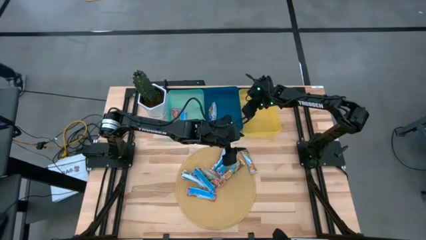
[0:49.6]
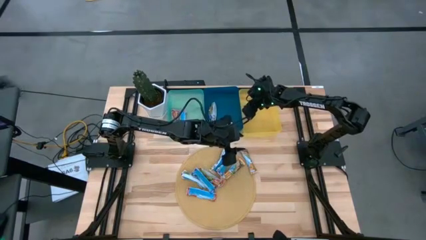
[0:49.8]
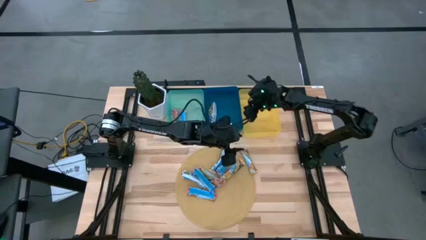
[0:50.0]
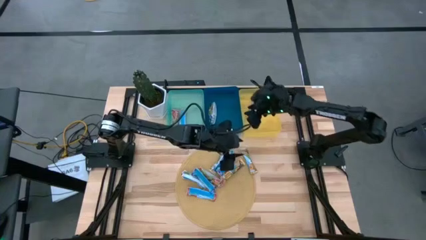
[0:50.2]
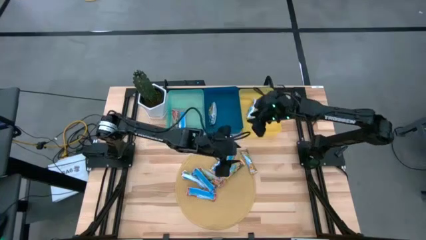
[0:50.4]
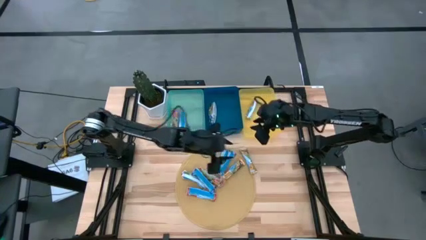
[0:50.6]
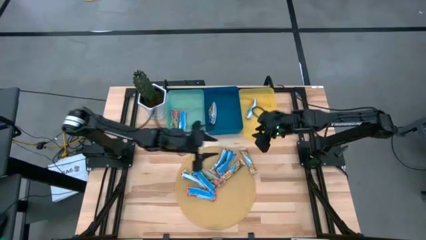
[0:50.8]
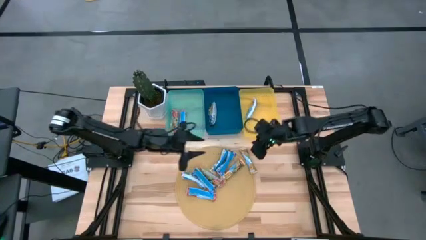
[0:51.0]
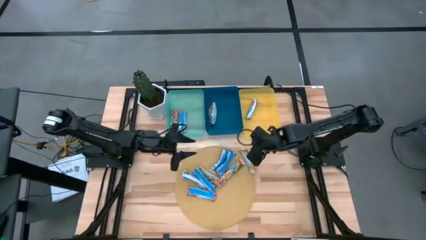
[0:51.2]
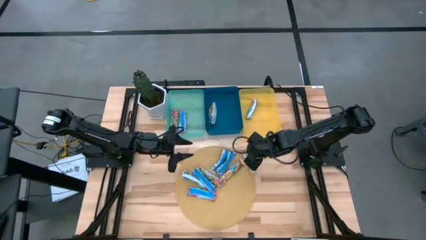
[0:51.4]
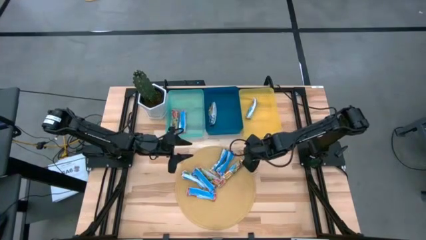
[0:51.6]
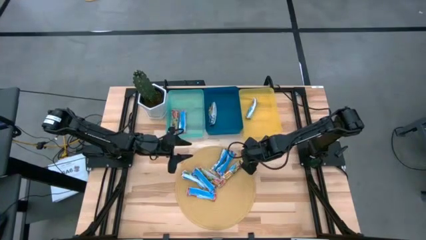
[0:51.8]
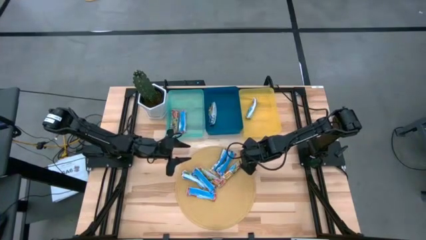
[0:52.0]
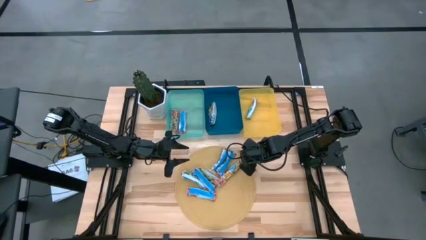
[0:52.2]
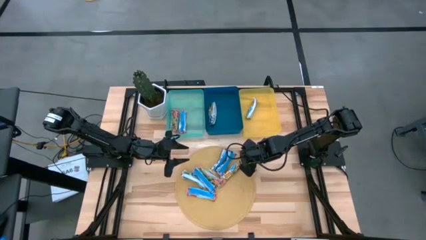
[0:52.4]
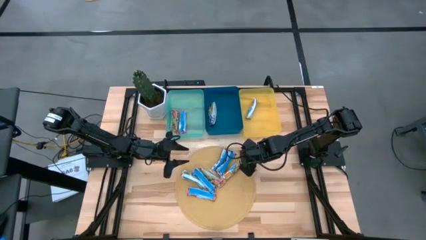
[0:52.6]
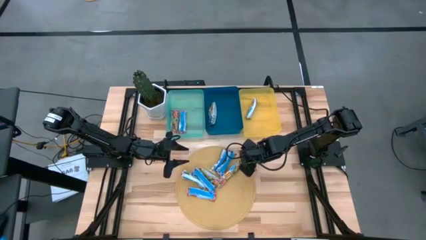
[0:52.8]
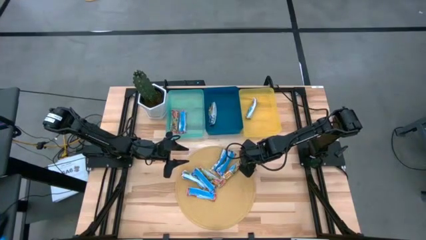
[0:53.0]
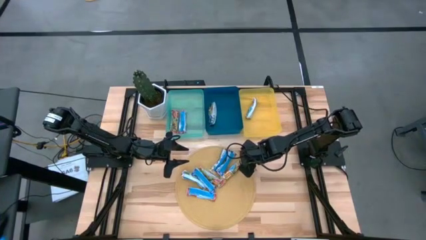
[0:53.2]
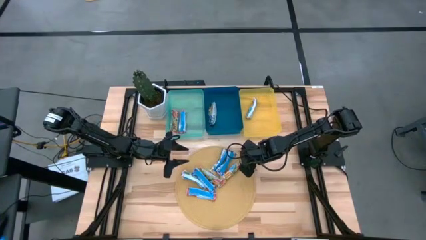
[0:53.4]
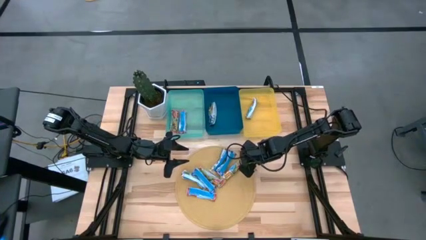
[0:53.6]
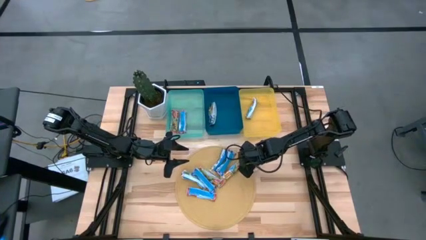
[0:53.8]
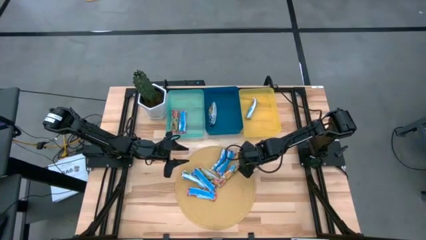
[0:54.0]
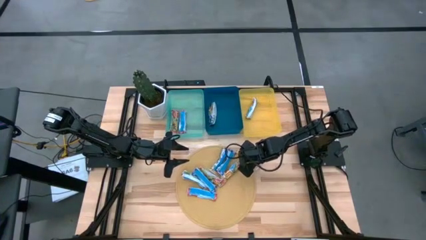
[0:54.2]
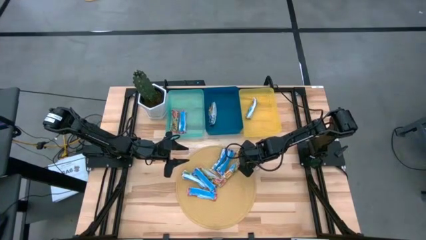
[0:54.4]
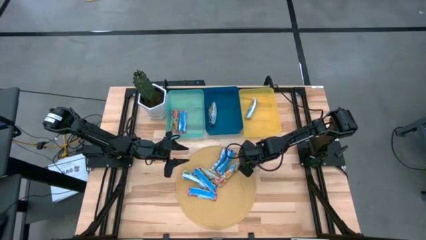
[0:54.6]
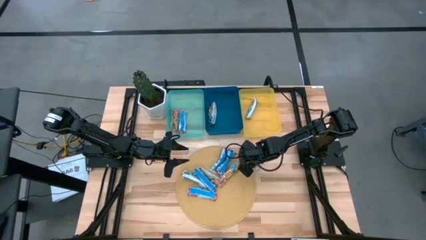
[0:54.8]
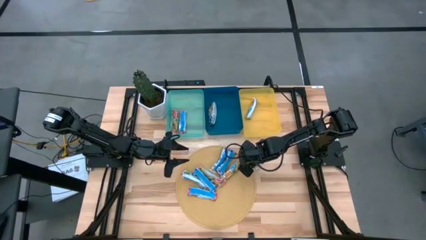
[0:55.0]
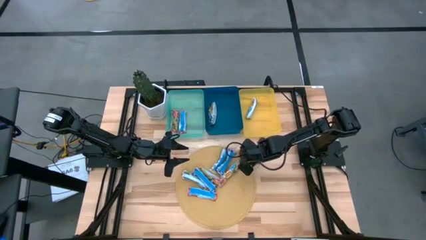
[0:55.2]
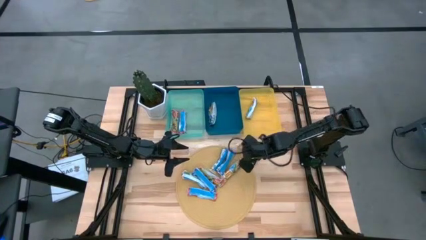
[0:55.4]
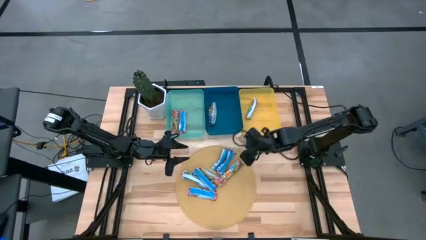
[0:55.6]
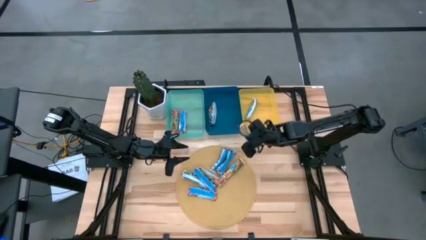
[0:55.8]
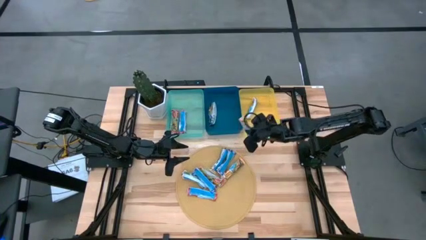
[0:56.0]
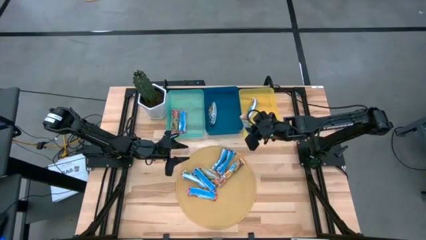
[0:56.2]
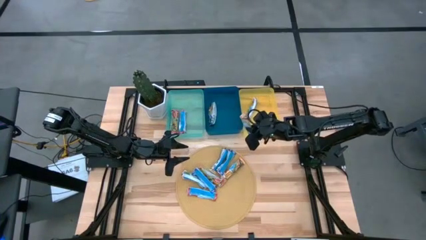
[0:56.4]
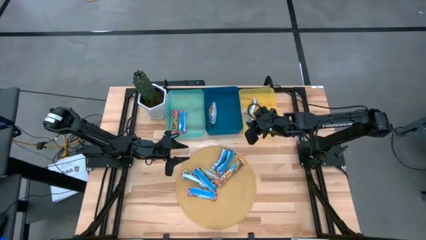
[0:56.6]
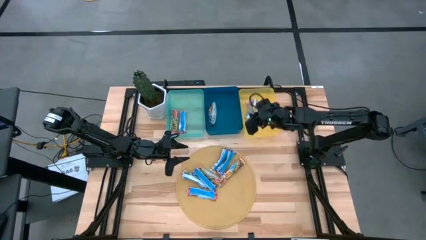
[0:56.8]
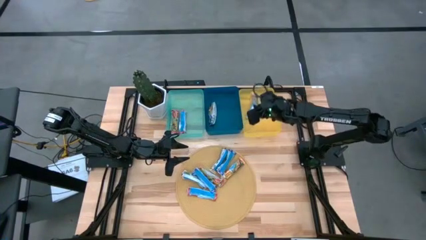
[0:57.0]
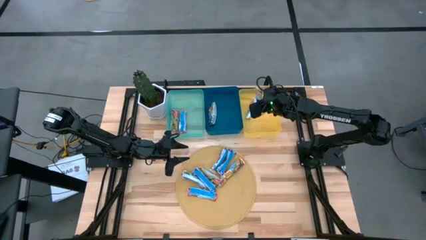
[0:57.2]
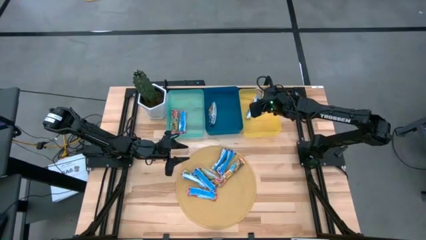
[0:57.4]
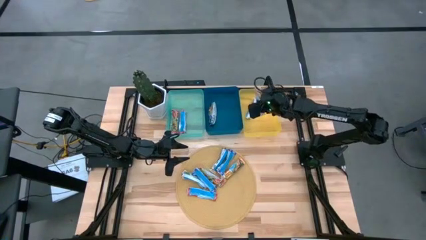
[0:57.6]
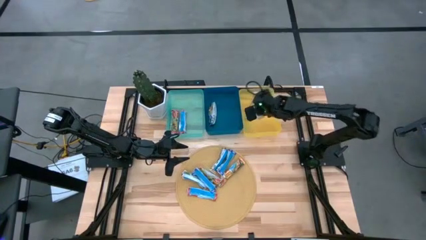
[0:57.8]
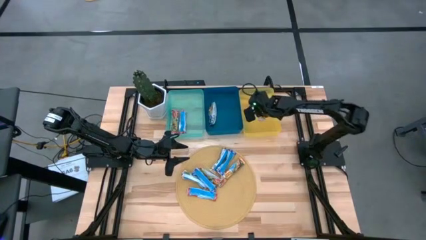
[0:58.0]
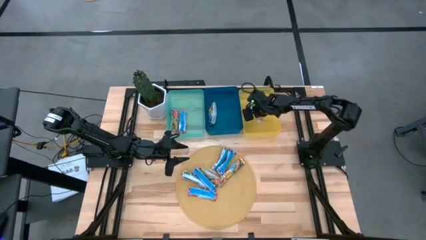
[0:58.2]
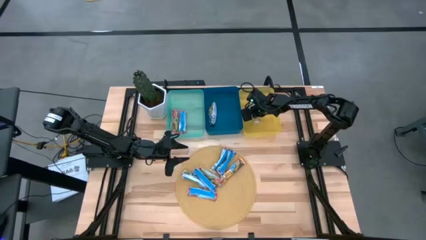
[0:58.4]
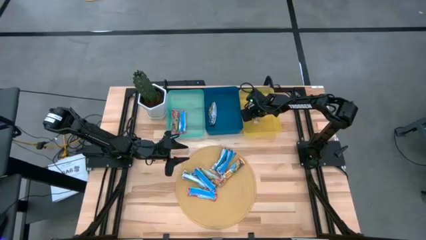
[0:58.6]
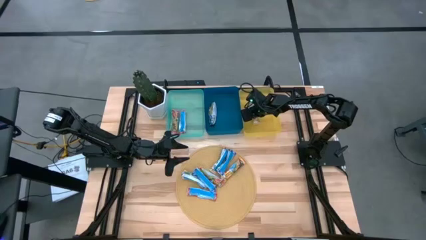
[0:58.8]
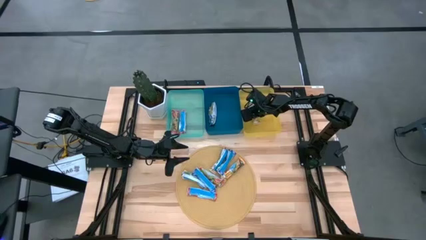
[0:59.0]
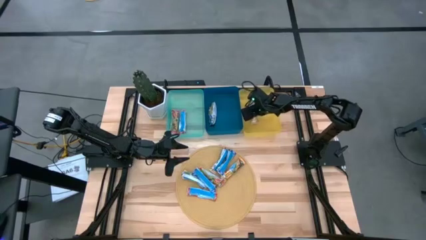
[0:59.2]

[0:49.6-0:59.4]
Task: Pick and place Granola Bars by type
Put the yellow granola bar into the yellow bin

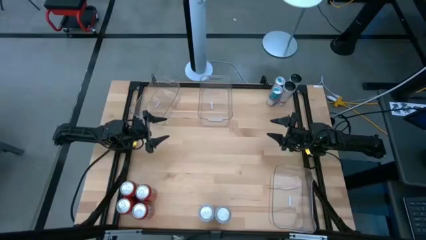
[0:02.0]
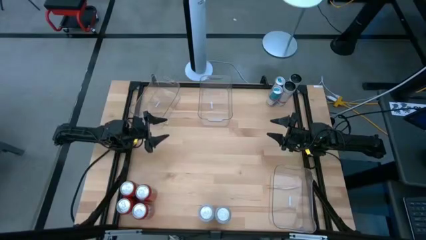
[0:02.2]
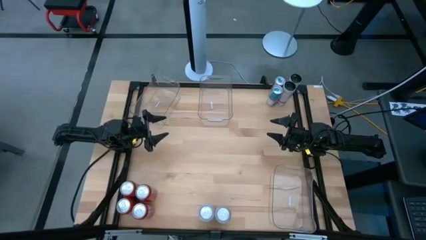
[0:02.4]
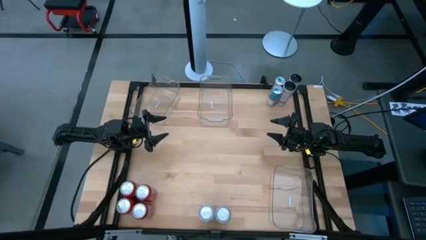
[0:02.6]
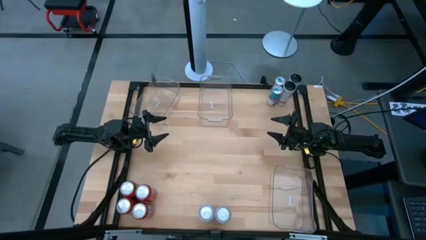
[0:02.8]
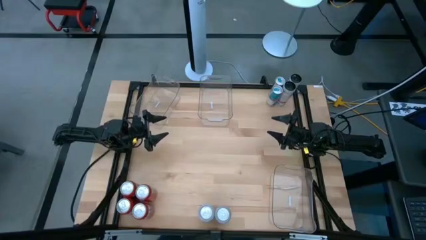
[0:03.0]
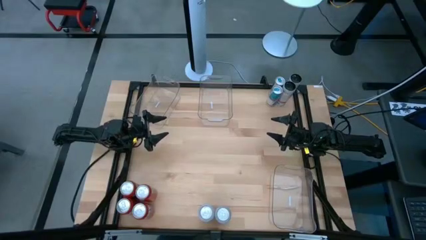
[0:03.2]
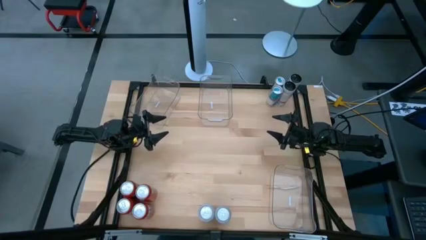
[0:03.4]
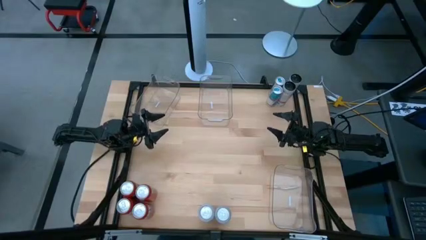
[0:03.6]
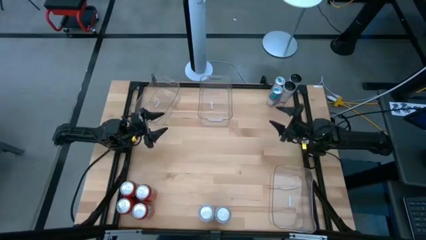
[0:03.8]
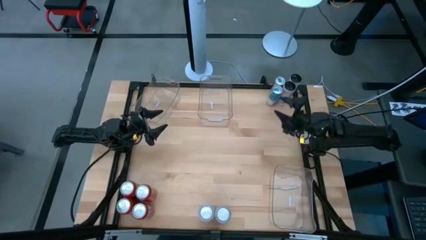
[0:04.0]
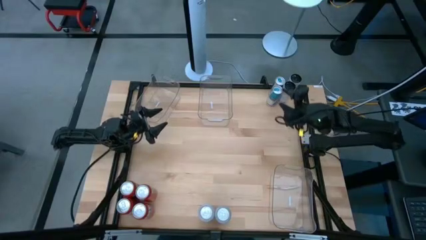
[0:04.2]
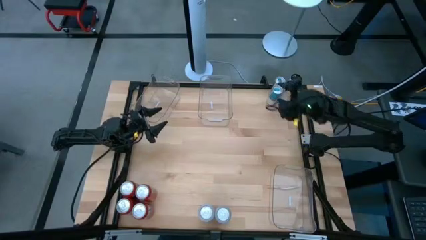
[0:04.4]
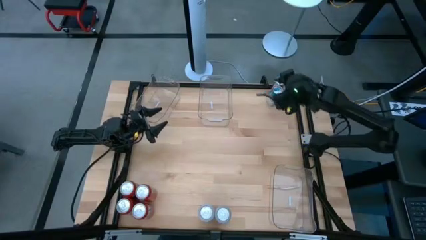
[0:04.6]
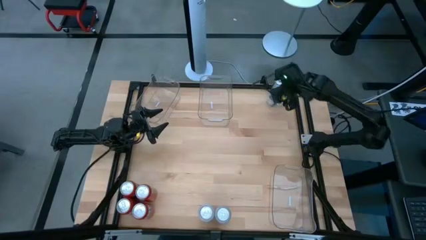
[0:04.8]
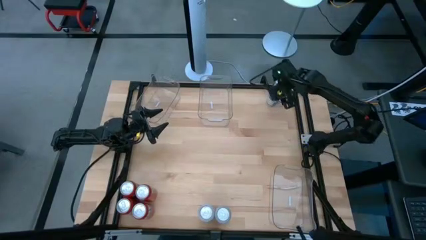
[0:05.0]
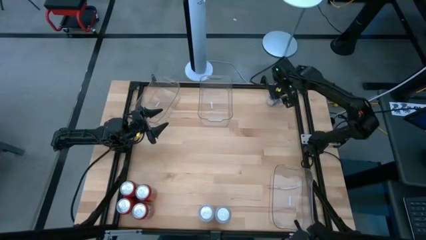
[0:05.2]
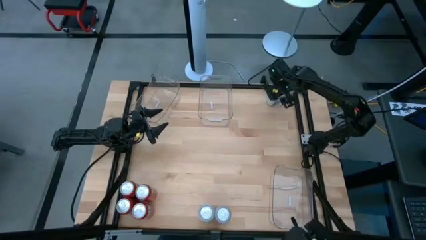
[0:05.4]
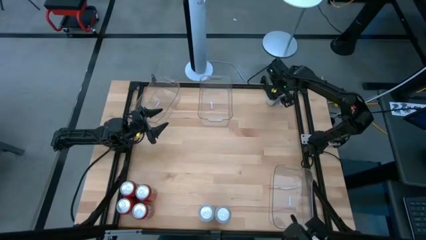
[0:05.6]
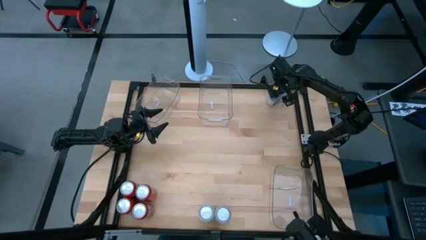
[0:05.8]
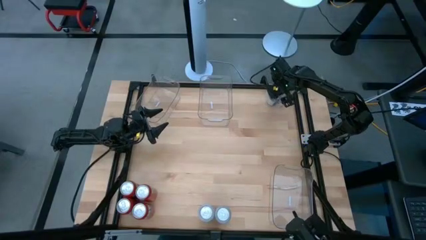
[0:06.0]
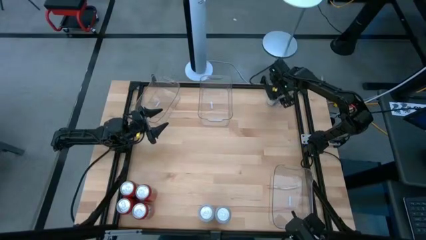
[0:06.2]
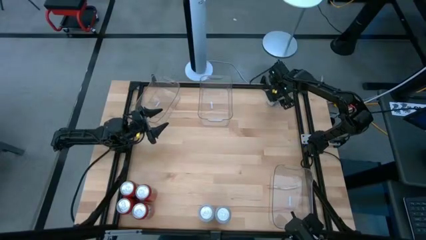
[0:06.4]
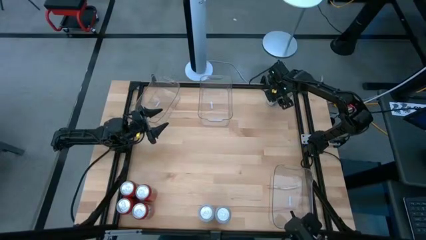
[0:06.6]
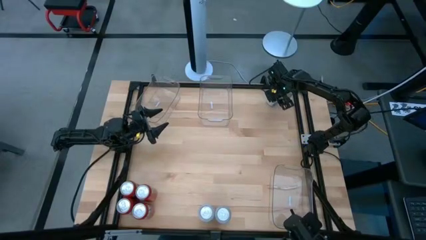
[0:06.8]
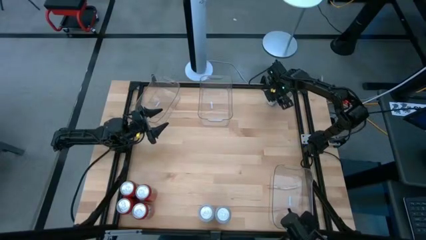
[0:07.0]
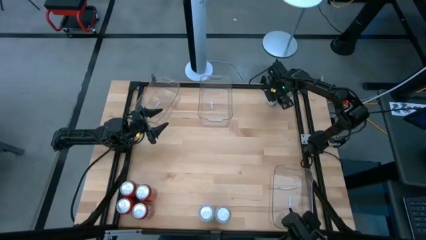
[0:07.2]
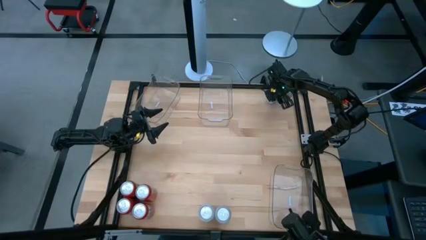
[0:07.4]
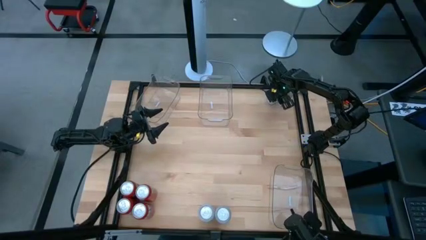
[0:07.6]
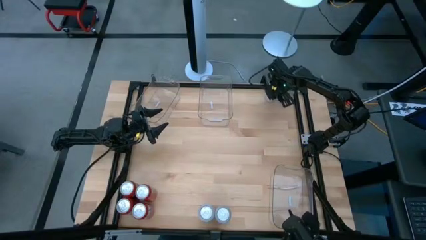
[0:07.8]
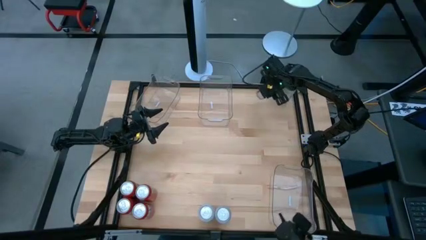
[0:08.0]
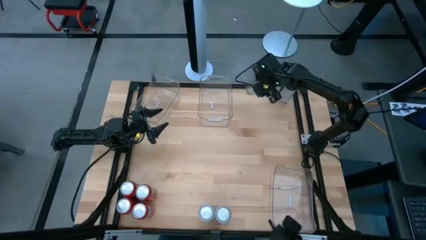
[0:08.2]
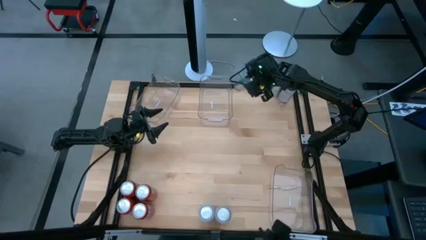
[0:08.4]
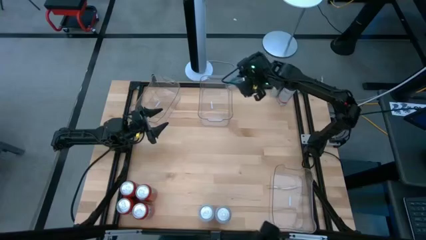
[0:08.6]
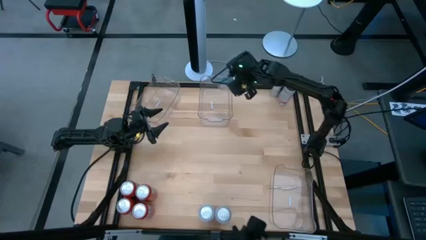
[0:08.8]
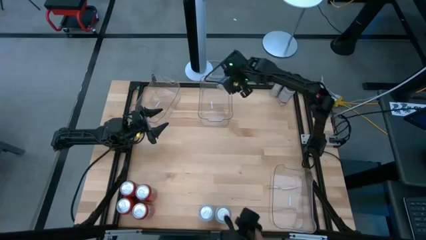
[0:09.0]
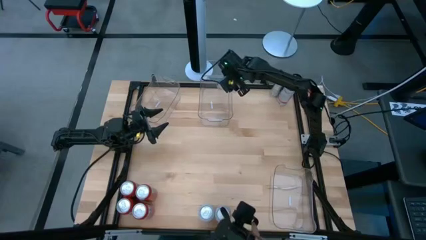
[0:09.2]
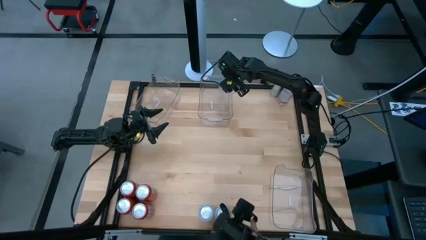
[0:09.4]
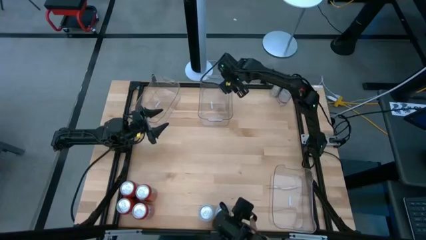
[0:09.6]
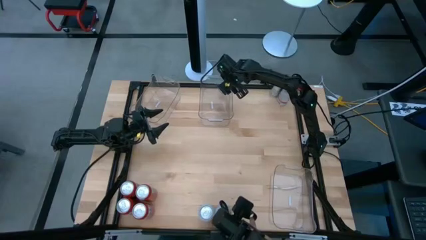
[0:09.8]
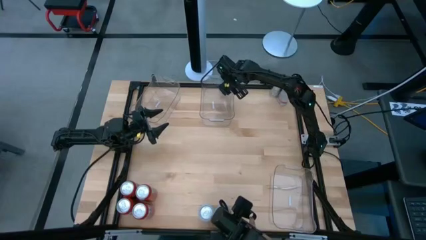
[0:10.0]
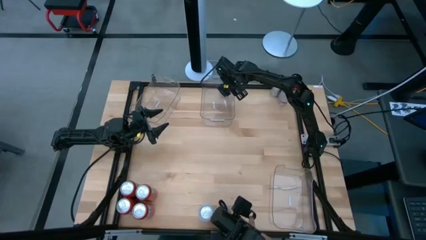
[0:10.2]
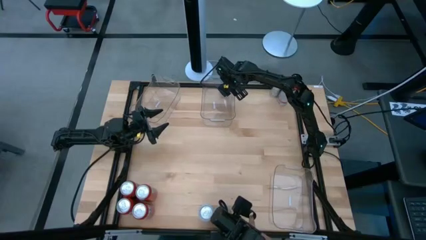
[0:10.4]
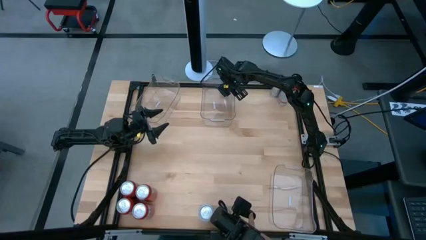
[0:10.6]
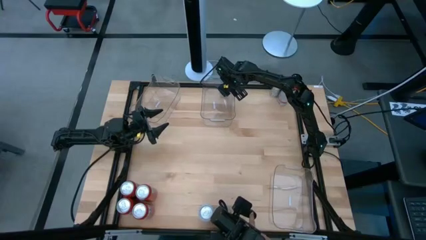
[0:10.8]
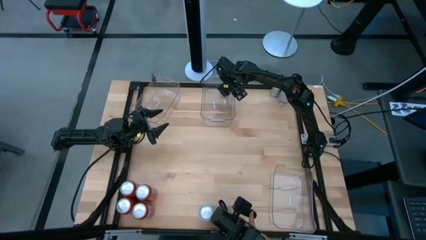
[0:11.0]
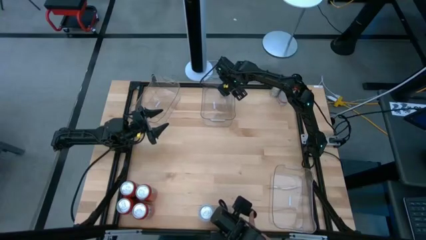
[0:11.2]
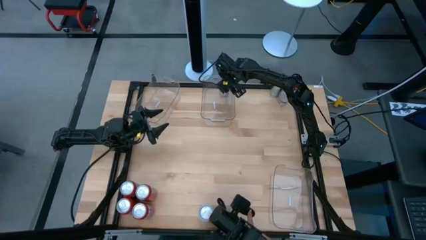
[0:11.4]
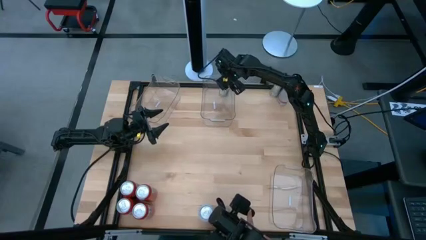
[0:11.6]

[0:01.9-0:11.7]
Task: Sort soda cans
Put the bottom blue soda can into the top middle transparent bin
